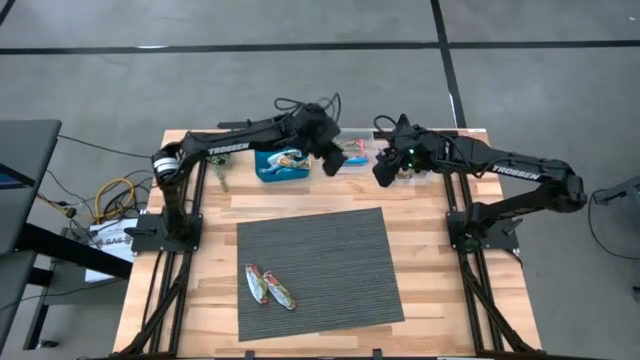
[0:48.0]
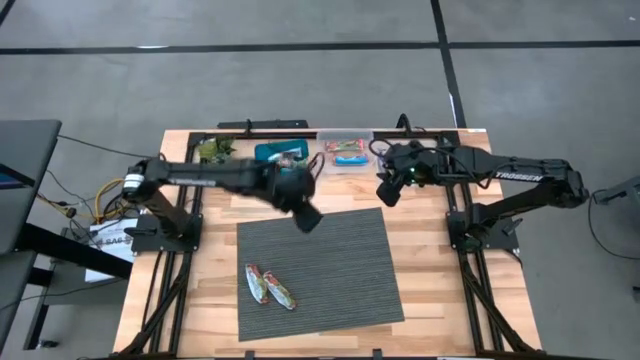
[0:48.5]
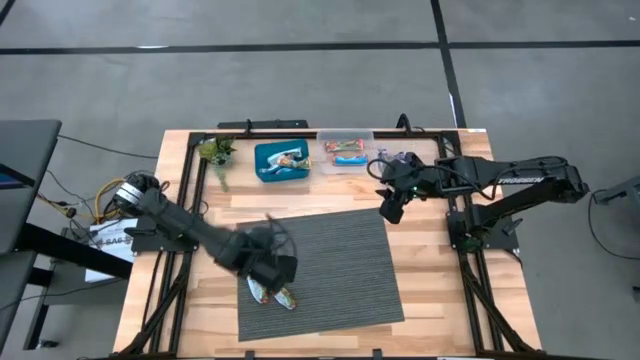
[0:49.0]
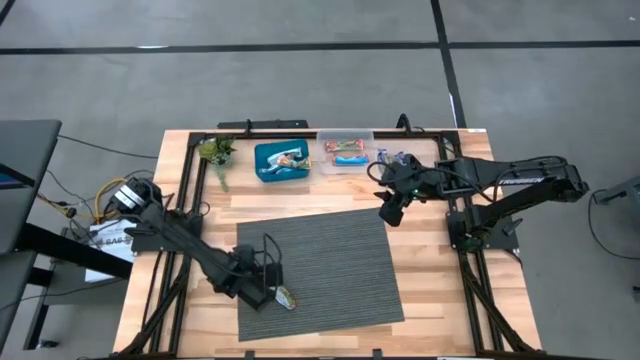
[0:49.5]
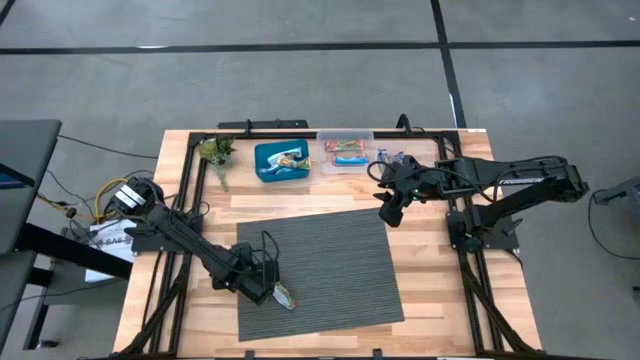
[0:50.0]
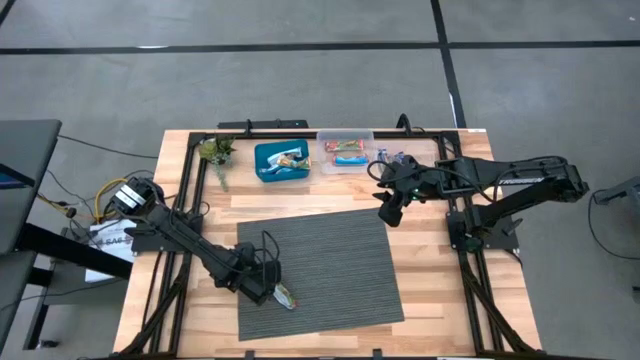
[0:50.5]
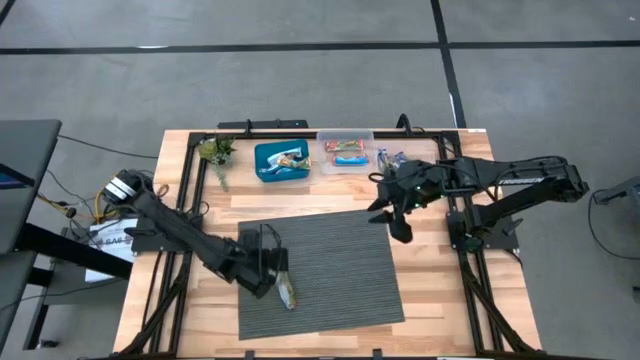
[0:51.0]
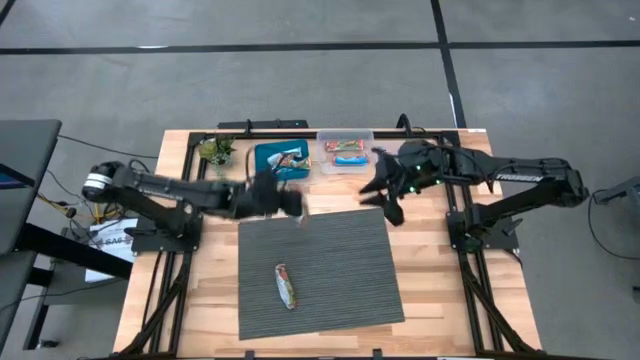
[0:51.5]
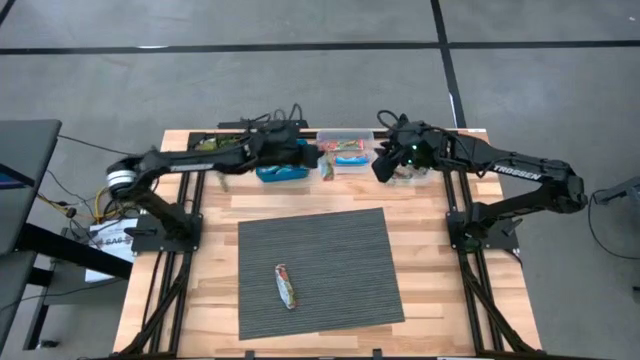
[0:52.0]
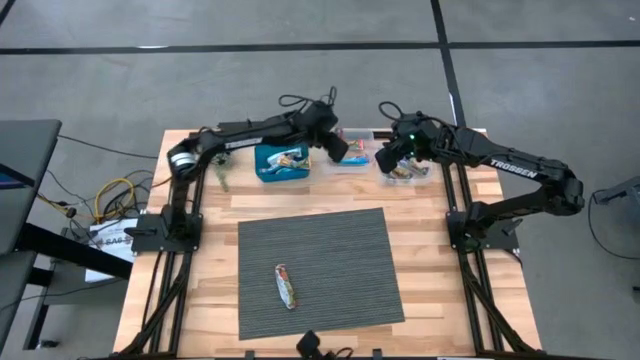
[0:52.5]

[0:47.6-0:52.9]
Task: Pick and place Granola Bars by type
Put the red granola bar into the left transparent bin

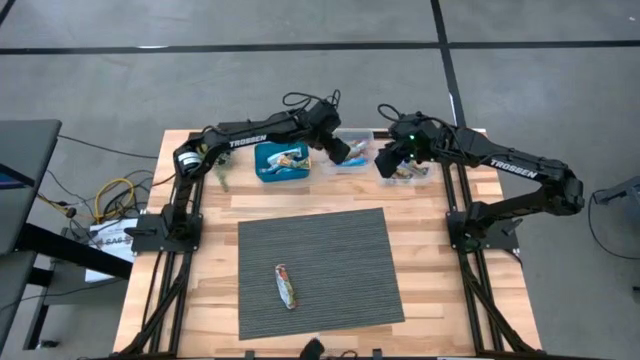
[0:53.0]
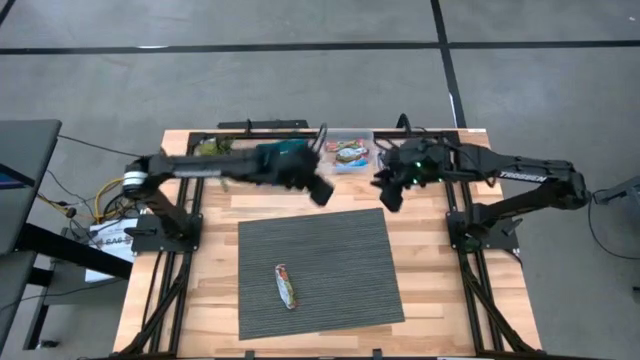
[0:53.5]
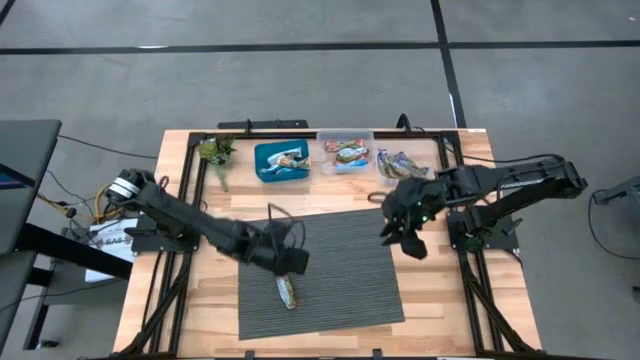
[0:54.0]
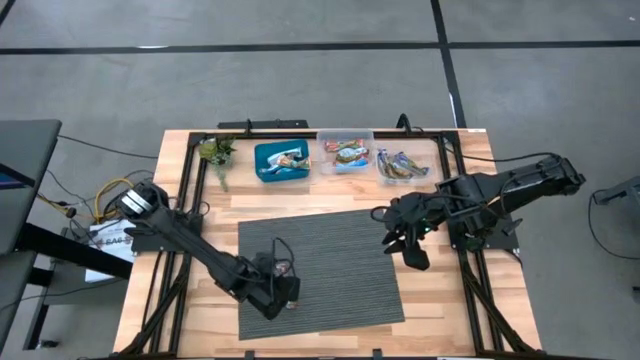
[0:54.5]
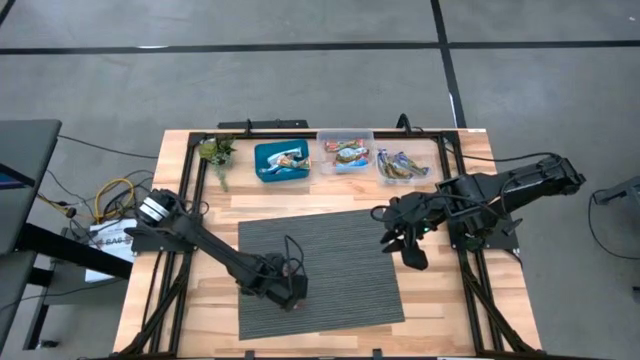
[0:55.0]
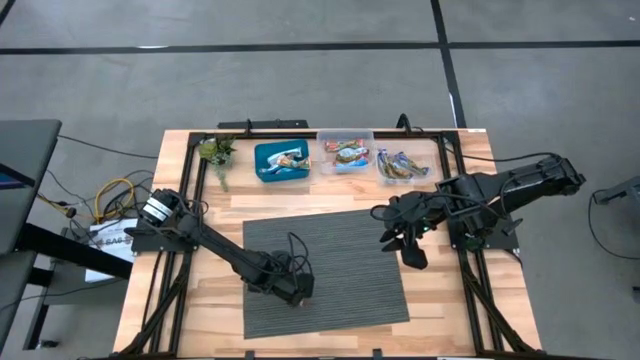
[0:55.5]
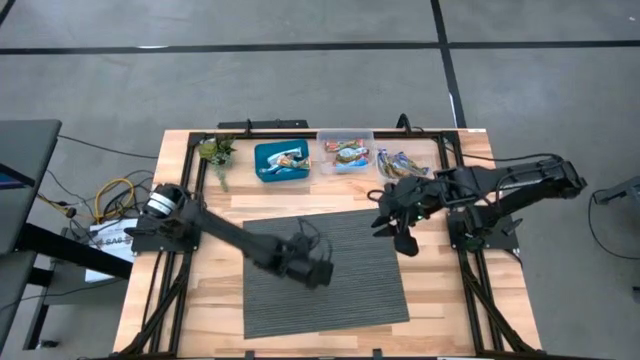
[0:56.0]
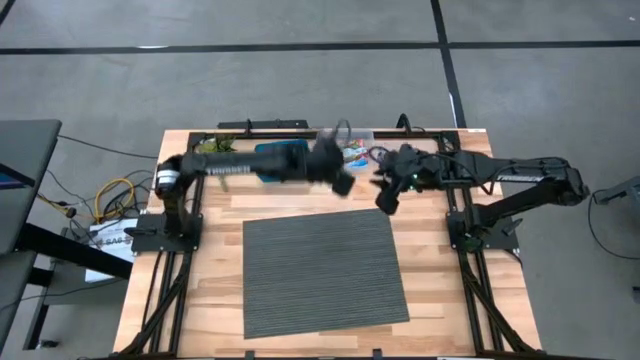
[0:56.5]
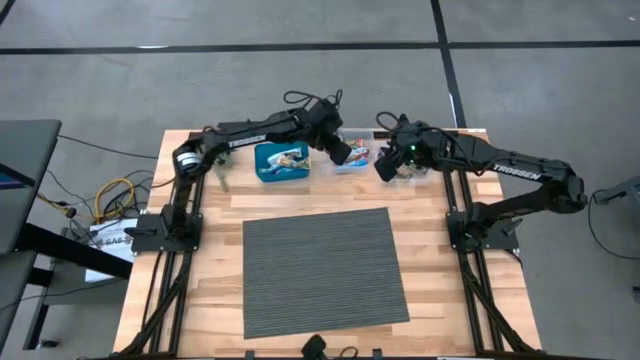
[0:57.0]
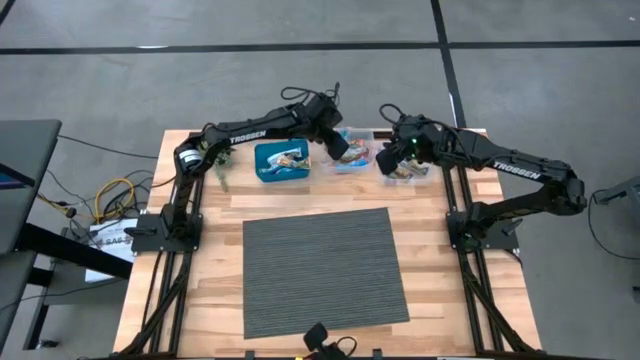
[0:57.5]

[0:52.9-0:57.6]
Put the red granola bar into the left transparent bin

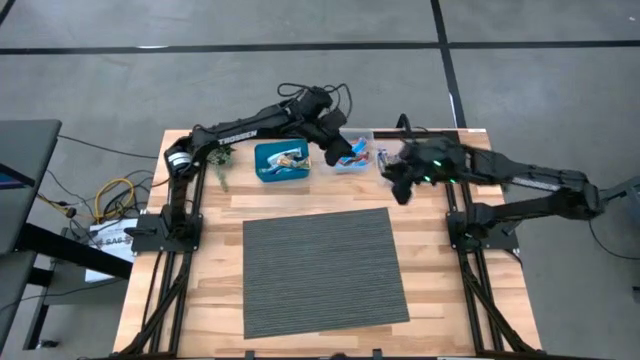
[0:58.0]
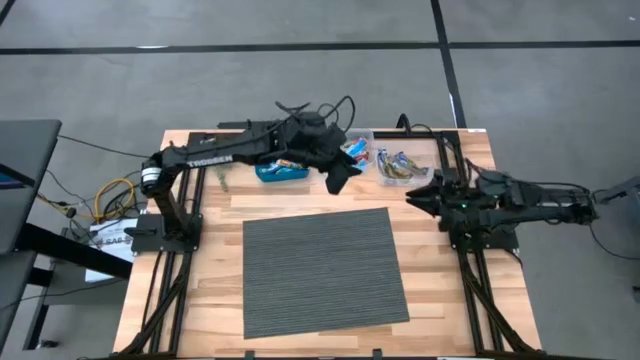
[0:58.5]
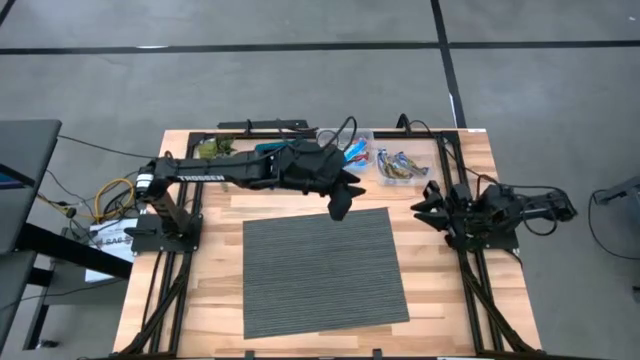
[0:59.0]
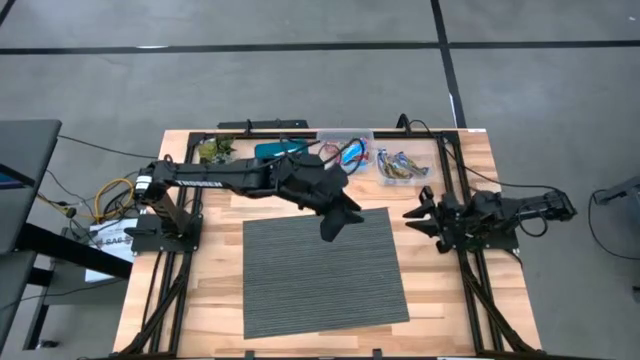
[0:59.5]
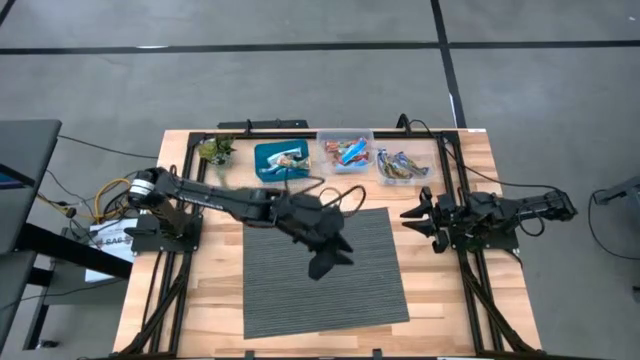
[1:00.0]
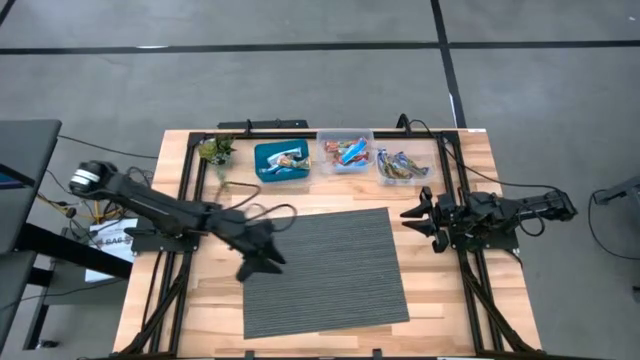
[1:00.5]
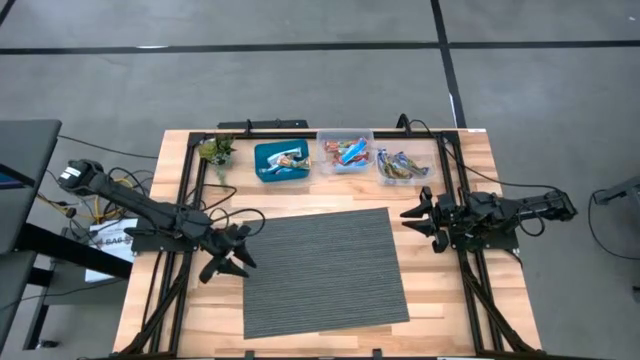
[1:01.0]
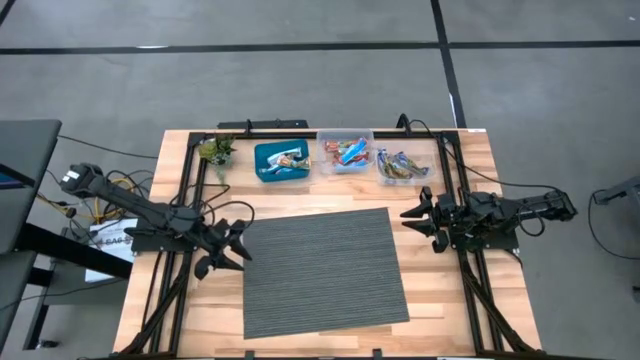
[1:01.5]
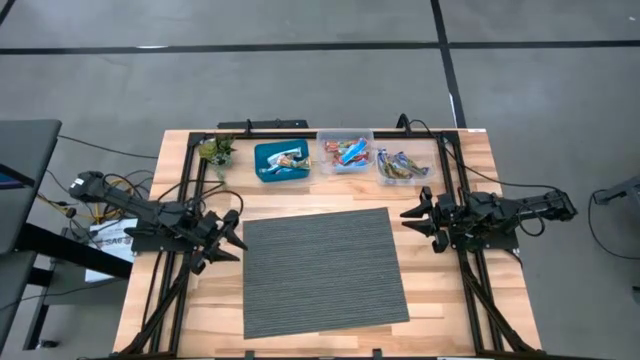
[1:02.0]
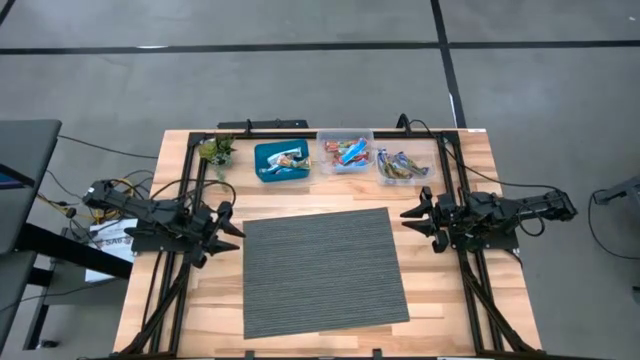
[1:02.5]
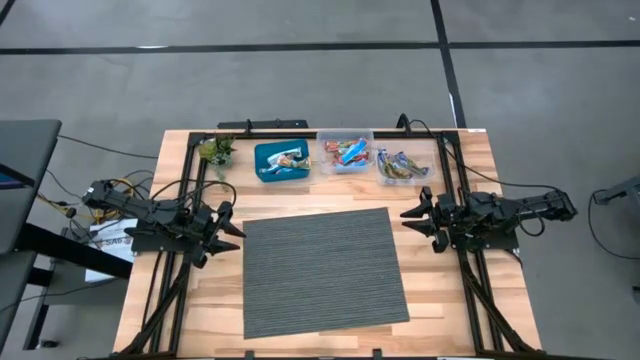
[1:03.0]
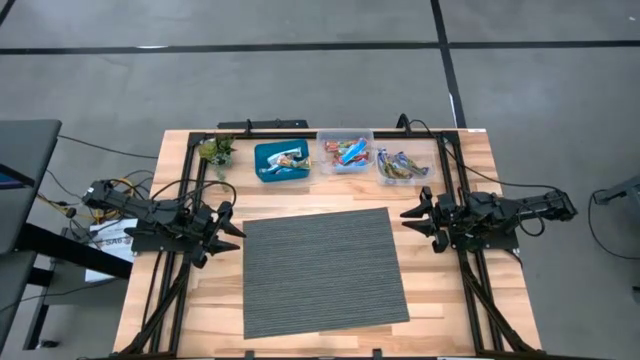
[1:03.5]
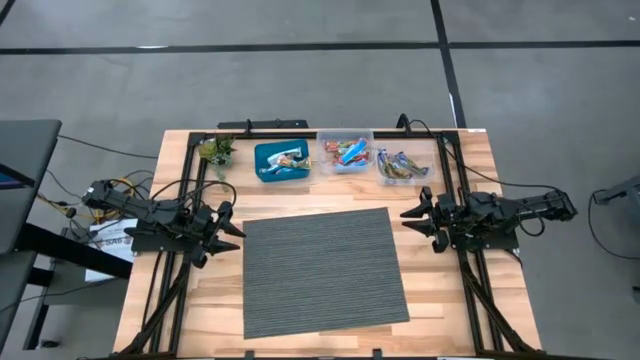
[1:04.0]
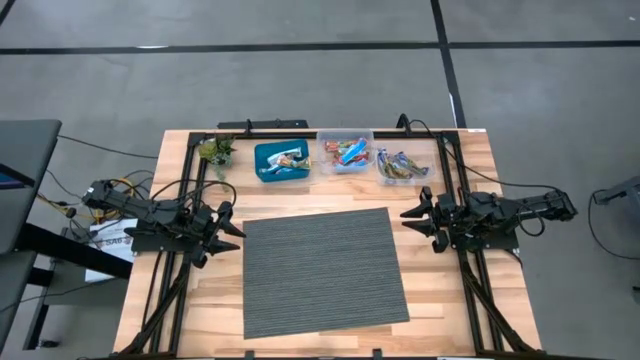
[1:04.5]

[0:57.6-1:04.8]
Return to Home Position

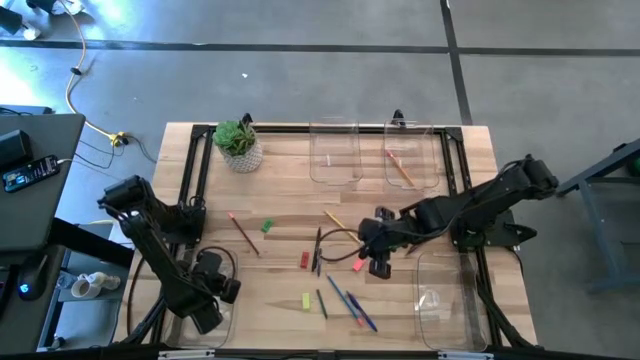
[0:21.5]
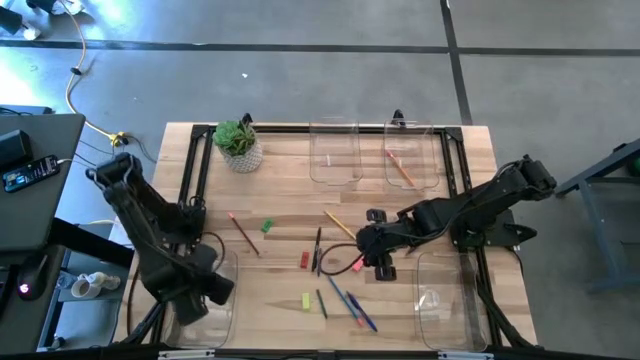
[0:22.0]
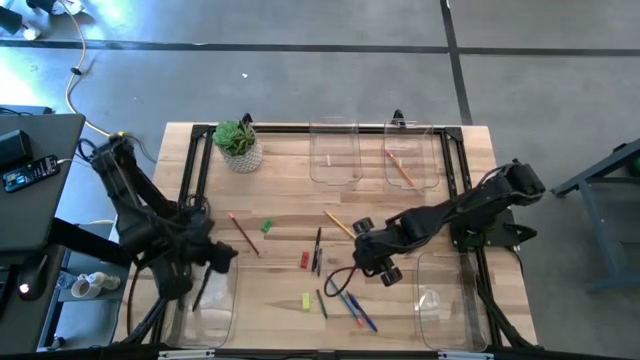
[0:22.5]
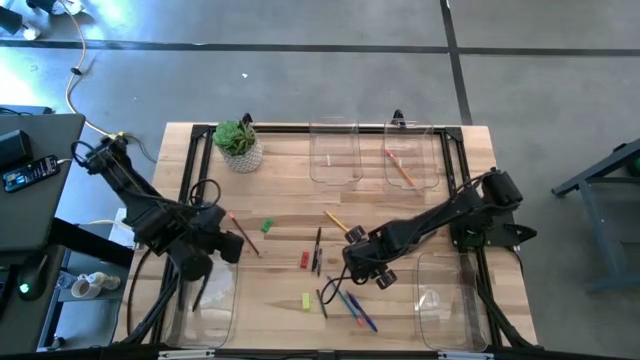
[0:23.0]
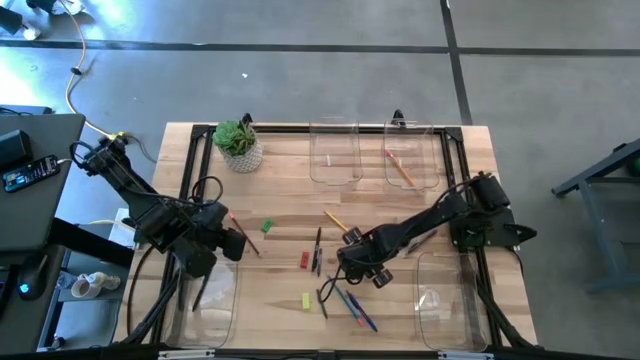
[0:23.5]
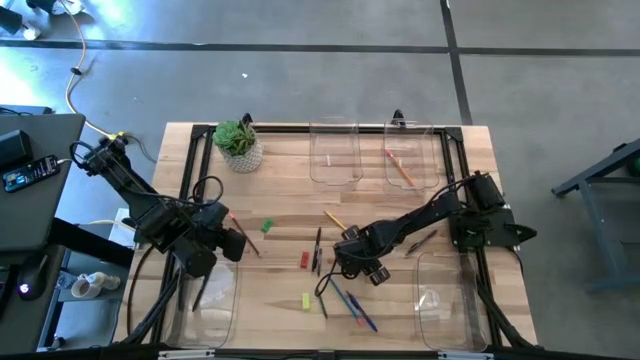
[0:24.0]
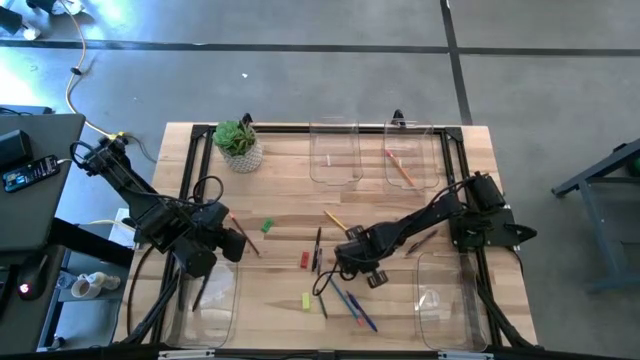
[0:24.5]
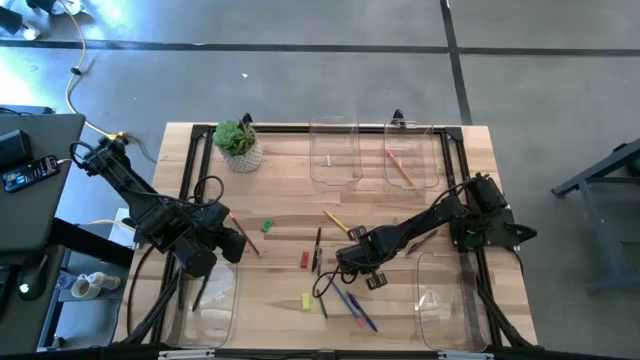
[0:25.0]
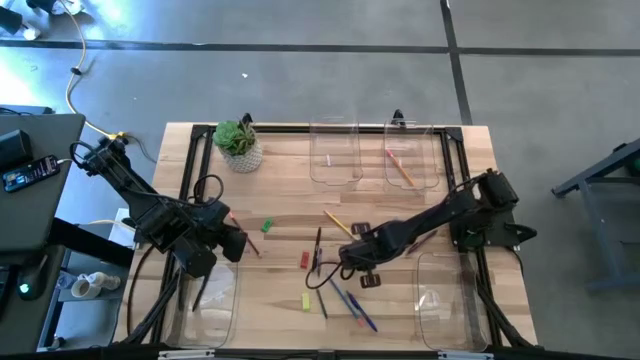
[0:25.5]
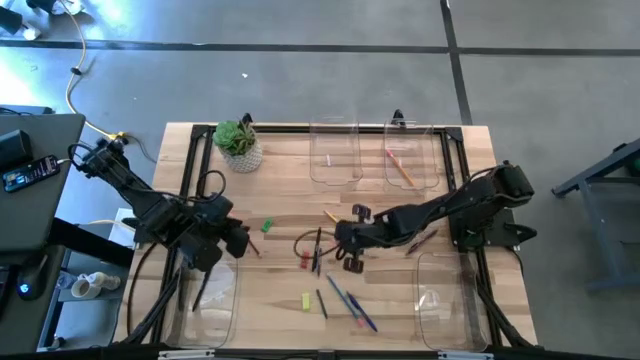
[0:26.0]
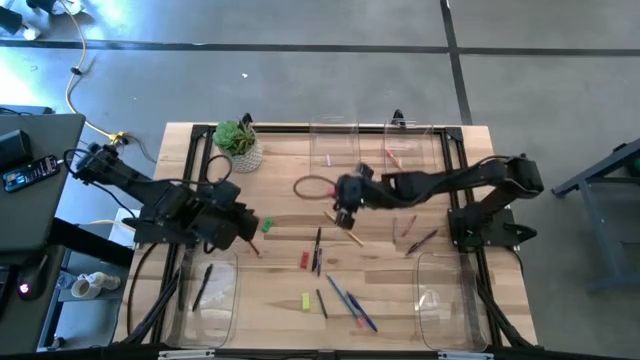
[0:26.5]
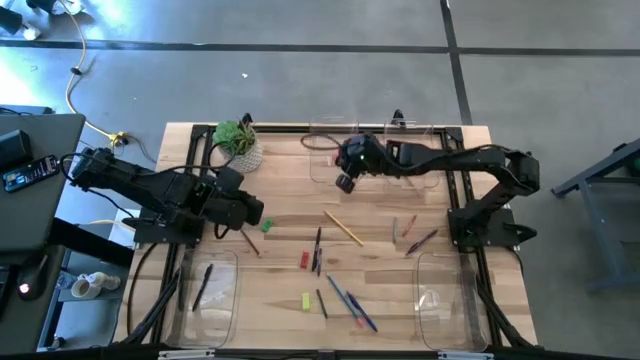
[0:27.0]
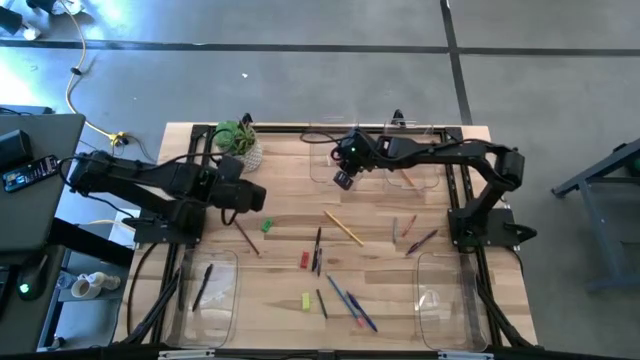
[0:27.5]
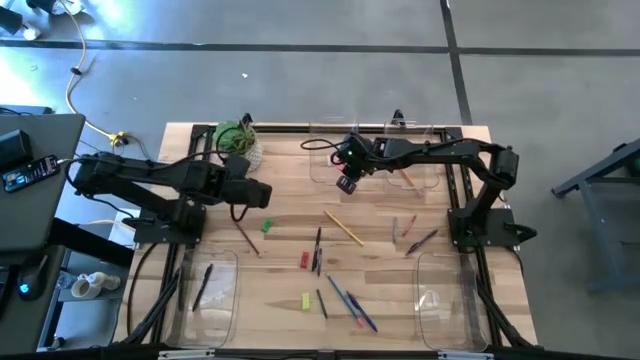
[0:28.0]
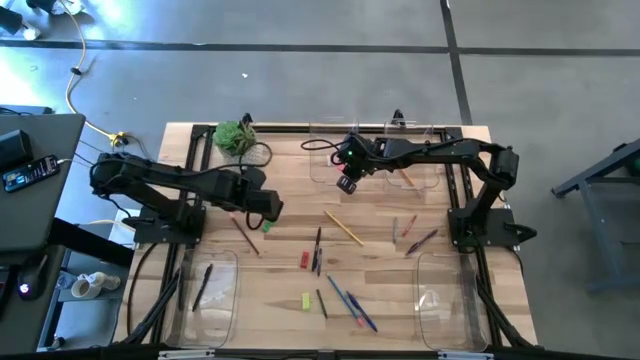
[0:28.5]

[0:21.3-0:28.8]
Task: Sort crayons/erasers/pens/pencils in bins
Put the pink eraser into the top right transparent bin
